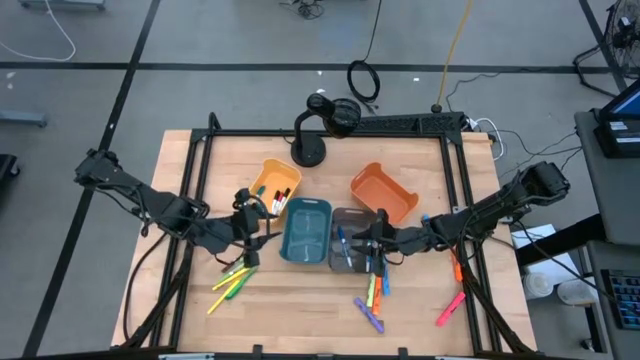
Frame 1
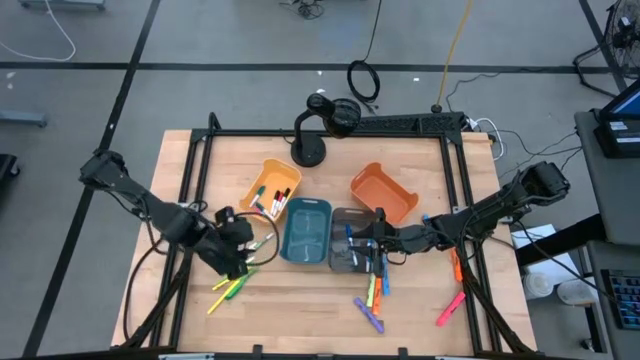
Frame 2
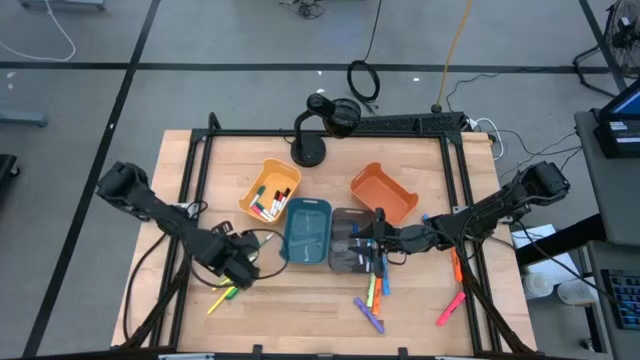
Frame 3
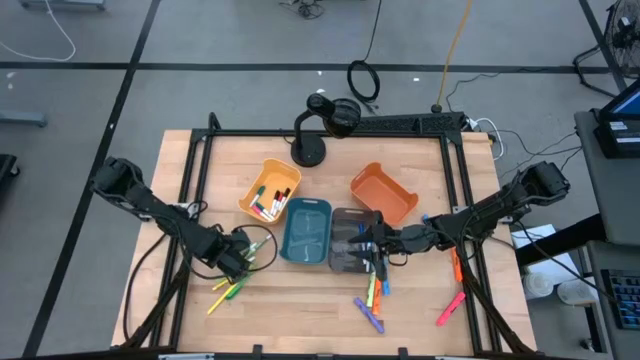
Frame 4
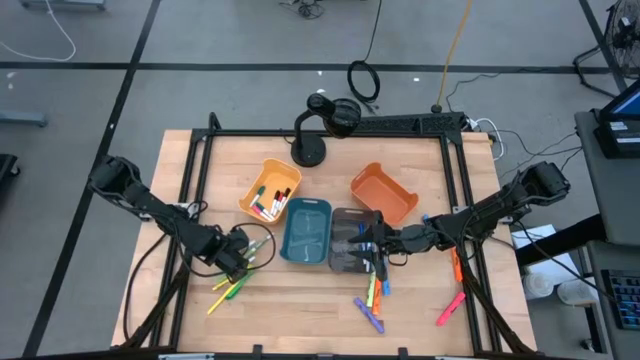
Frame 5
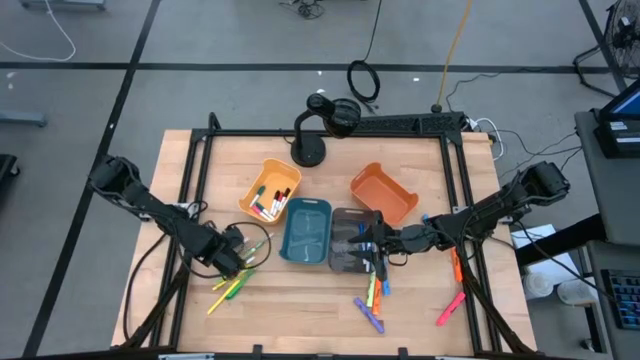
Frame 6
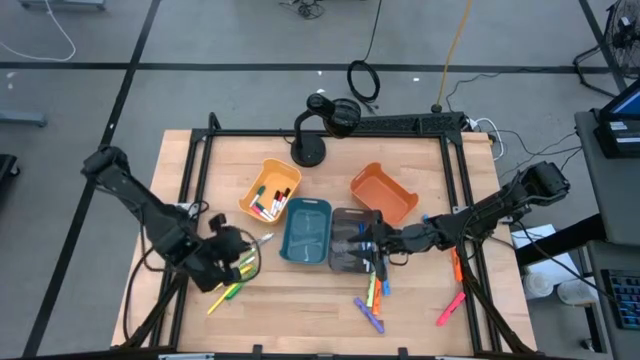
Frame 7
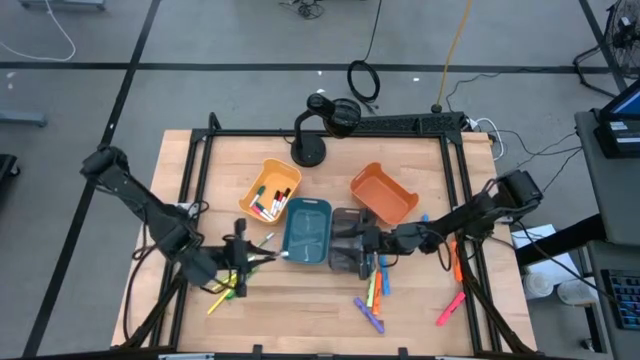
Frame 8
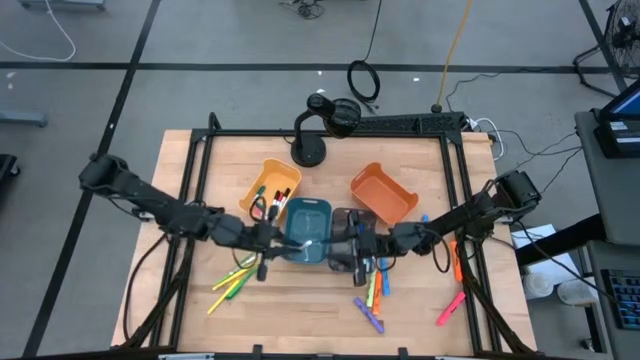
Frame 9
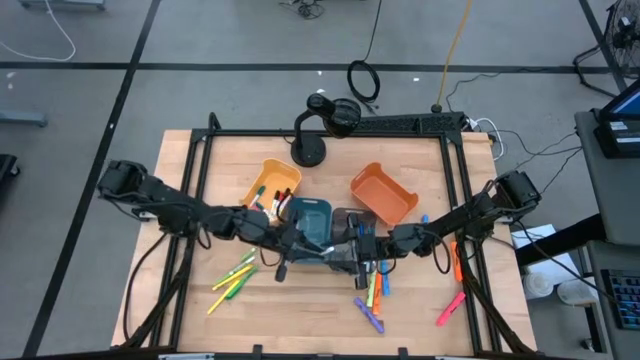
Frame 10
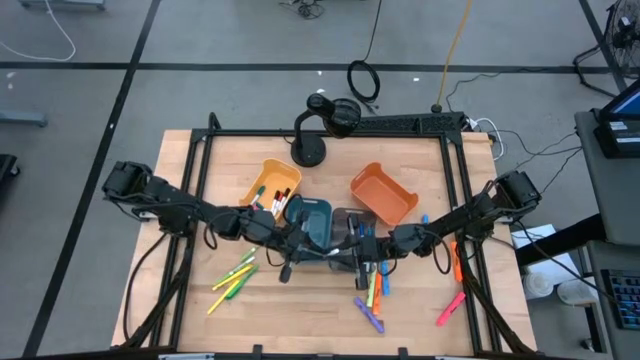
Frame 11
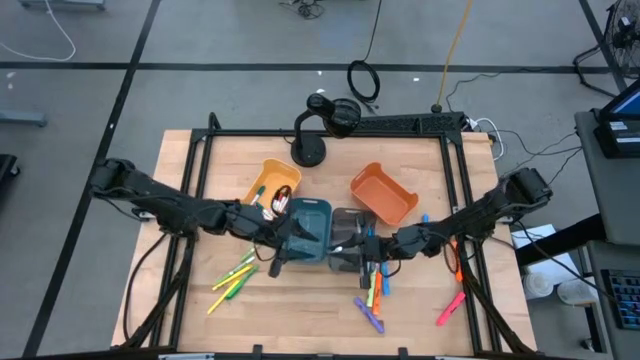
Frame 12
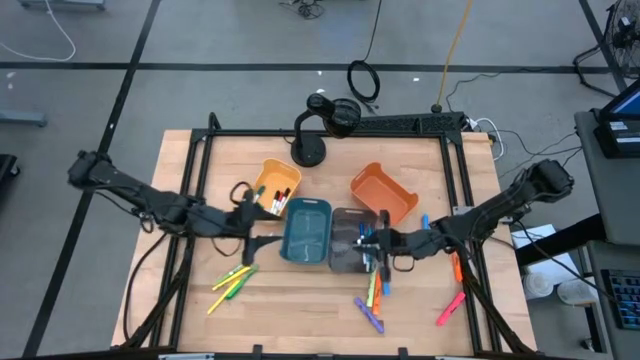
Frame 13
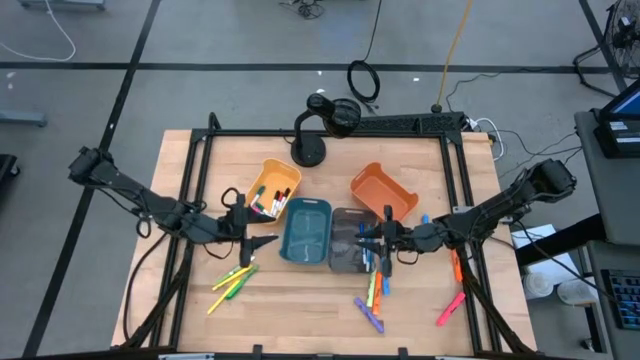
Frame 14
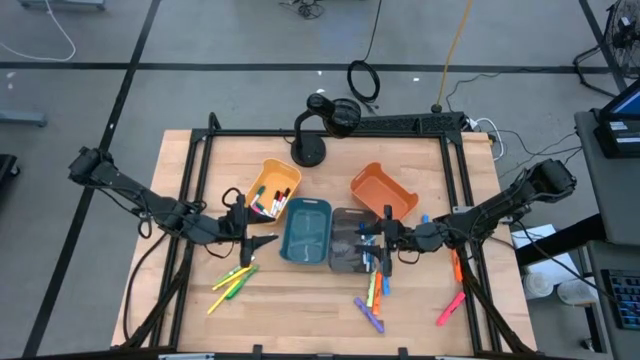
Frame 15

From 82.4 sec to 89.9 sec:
Task: Pick & Place Markers
Put the brown marker into the black bin

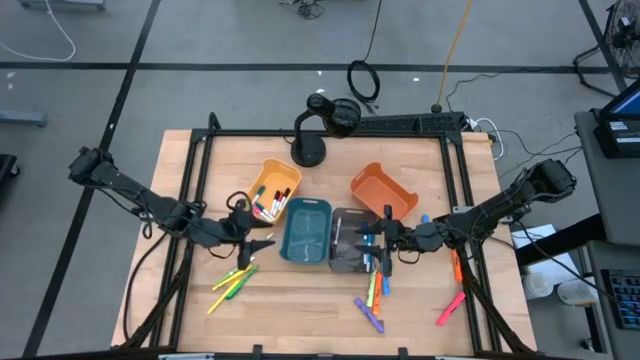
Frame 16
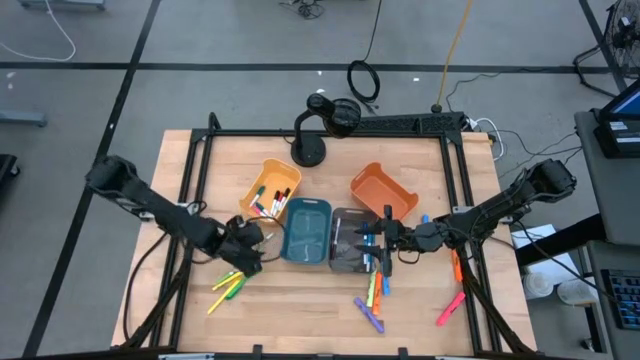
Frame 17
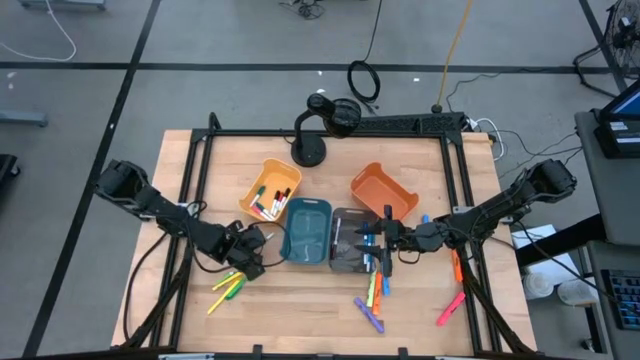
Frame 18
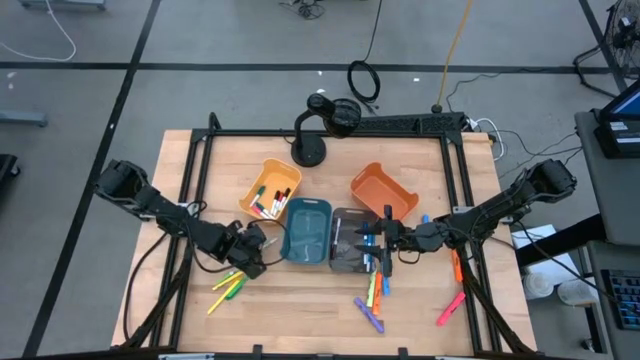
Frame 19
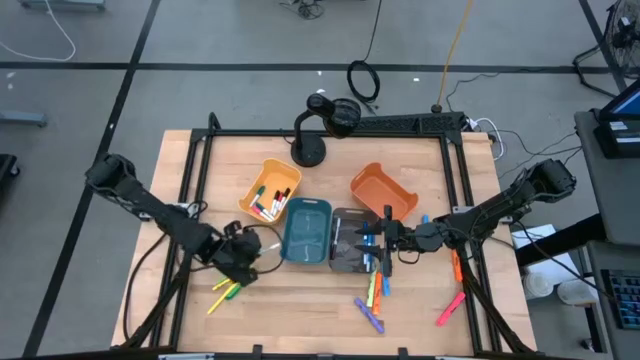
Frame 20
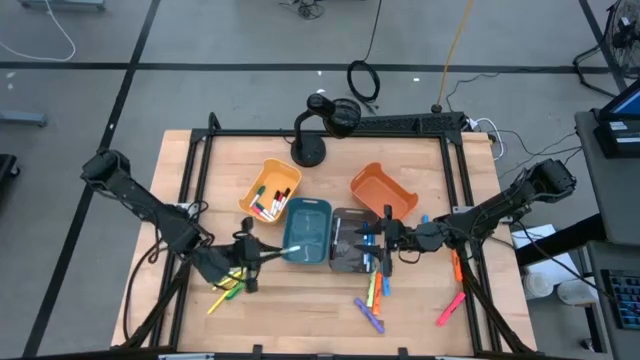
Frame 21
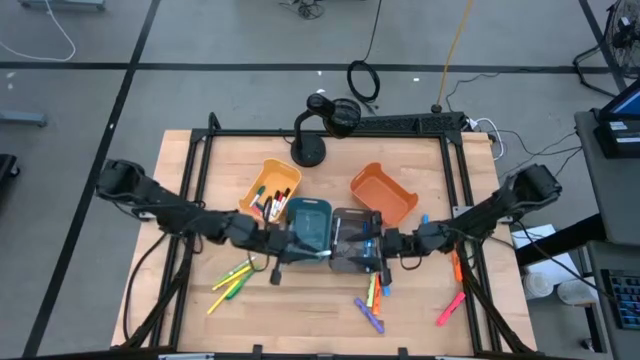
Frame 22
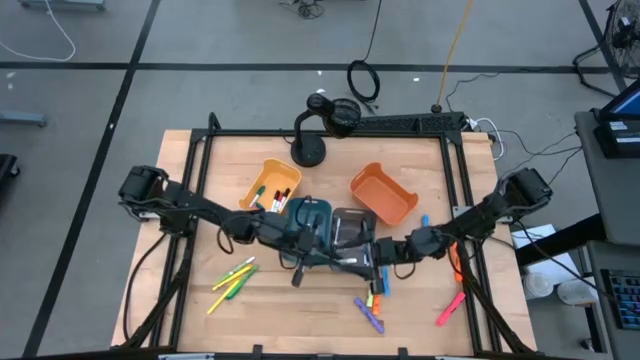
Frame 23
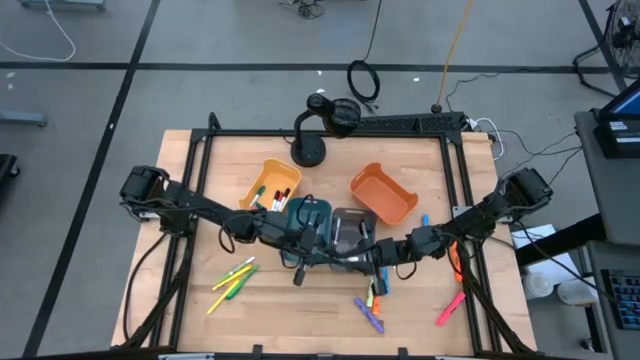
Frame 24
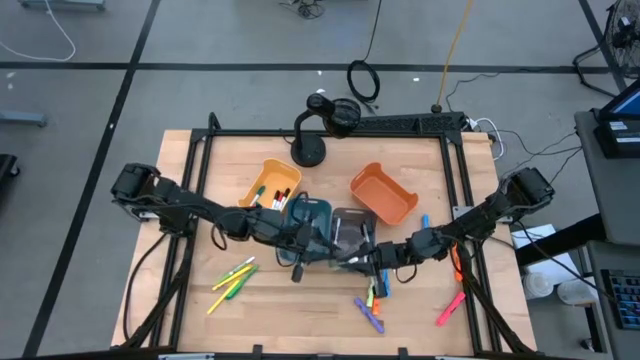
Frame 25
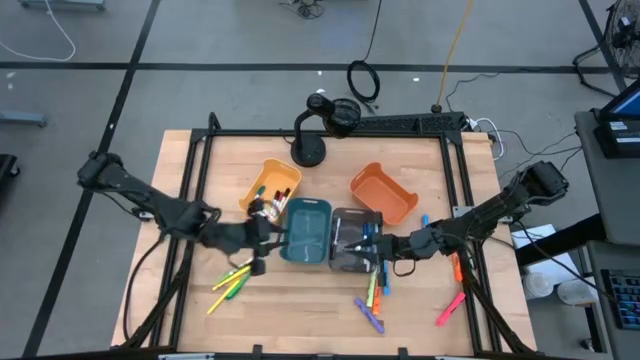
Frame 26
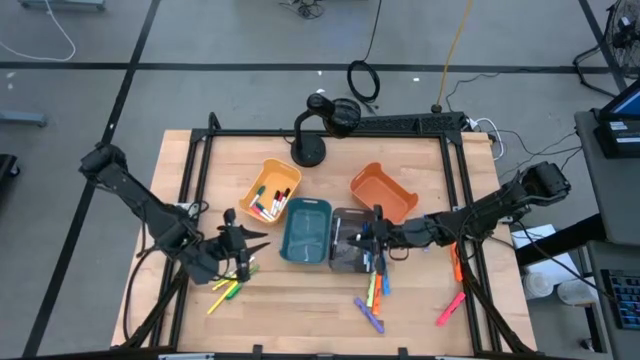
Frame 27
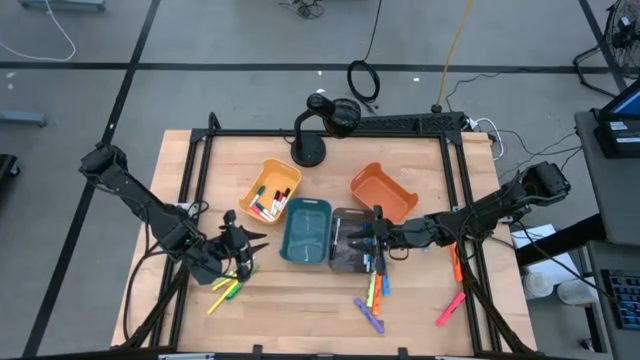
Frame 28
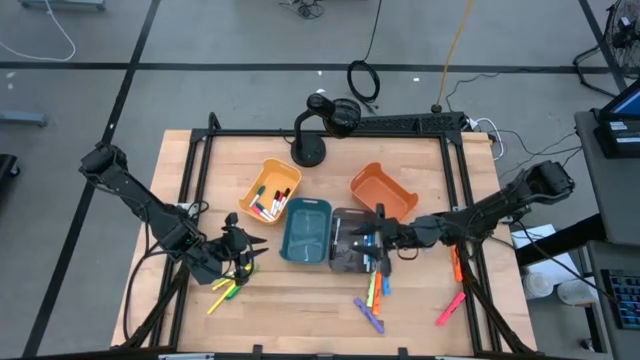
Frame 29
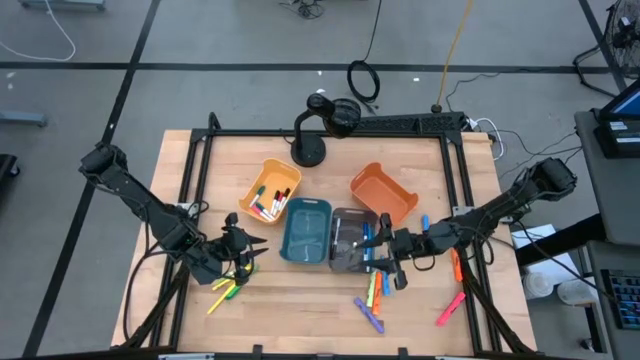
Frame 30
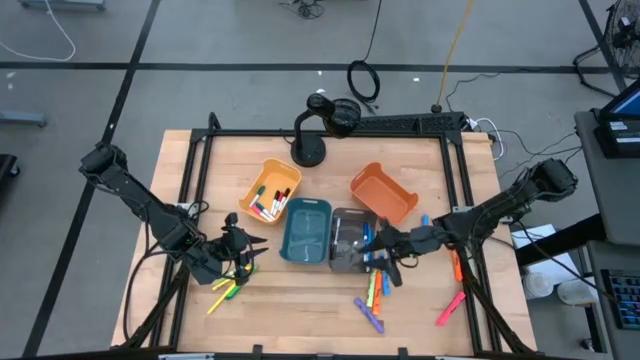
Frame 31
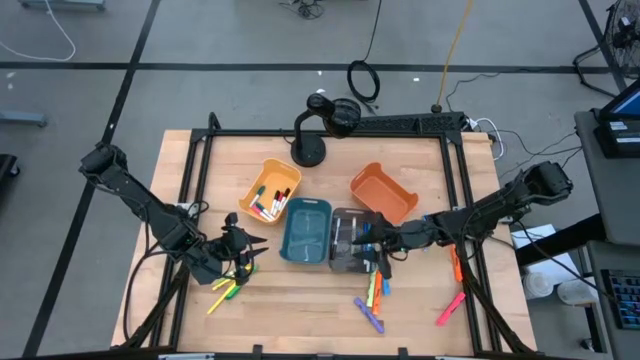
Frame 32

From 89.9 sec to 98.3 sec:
Put the top light green marker into the black bin

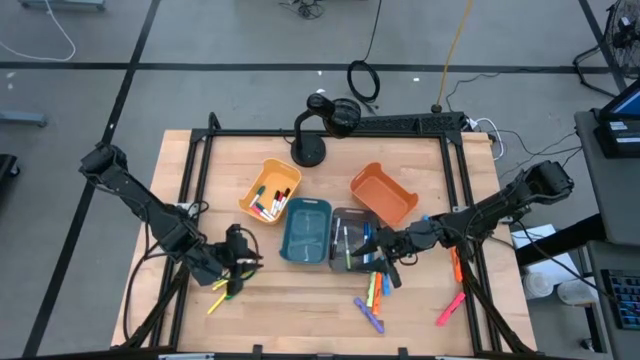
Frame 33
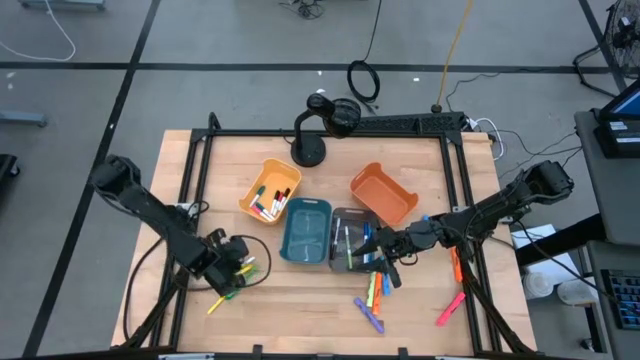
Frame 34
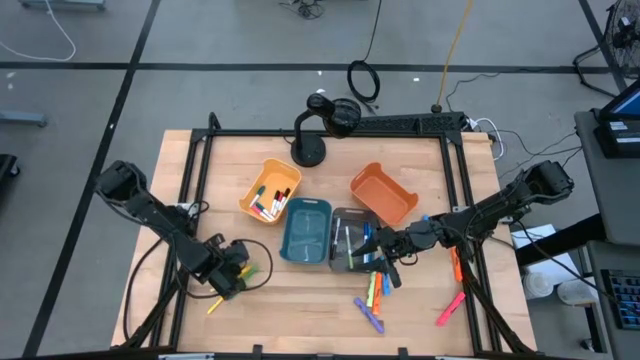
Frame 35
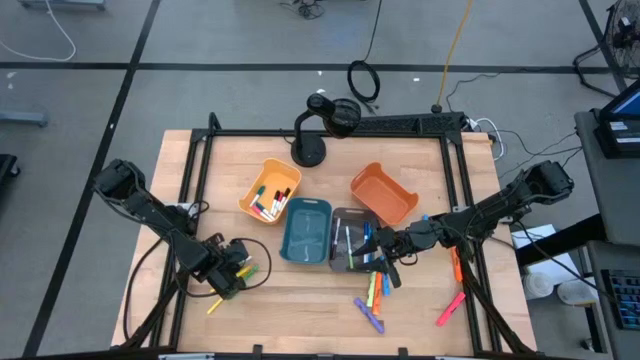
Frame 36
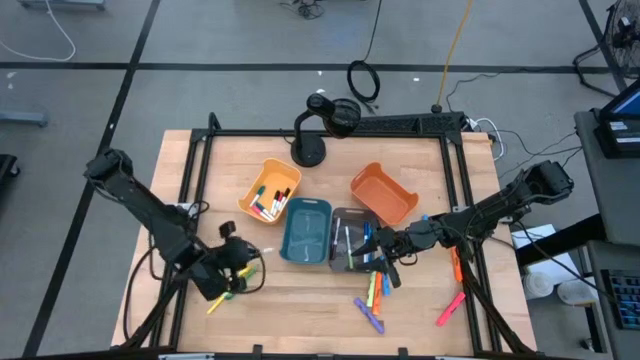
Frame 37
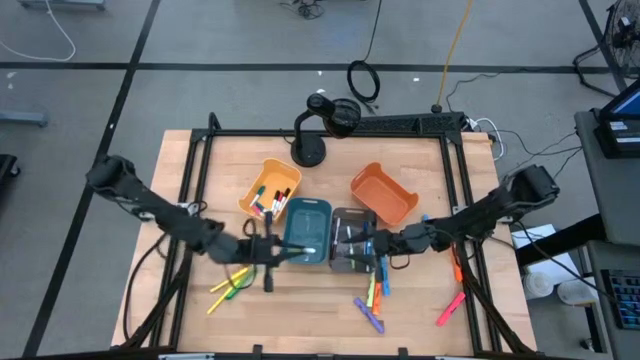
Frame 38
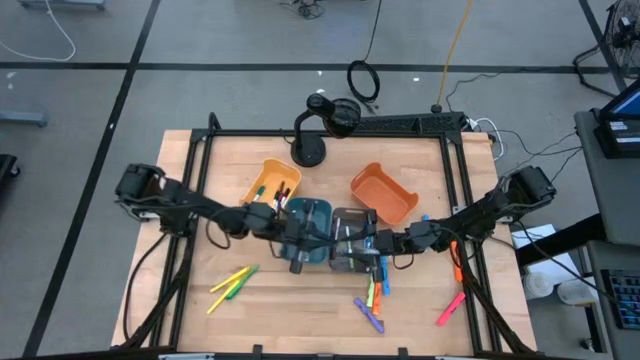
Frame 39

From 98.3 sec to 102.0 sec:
Put the light green marker into the black bin

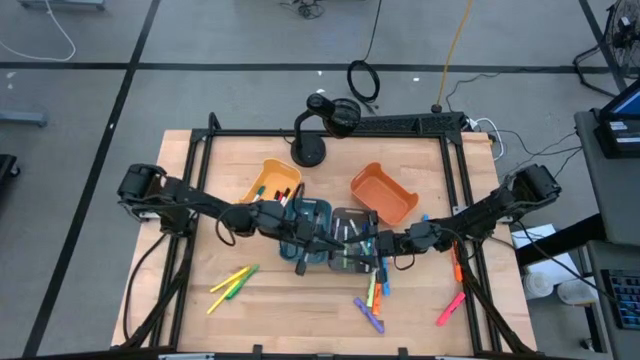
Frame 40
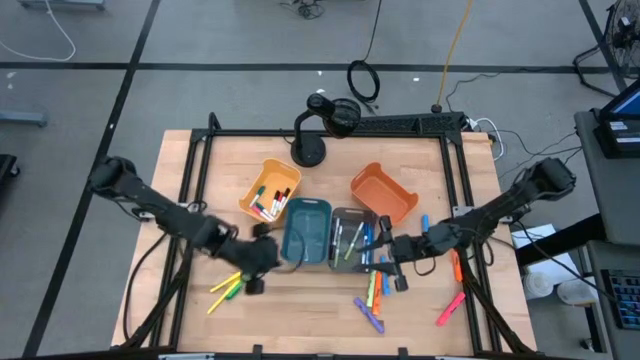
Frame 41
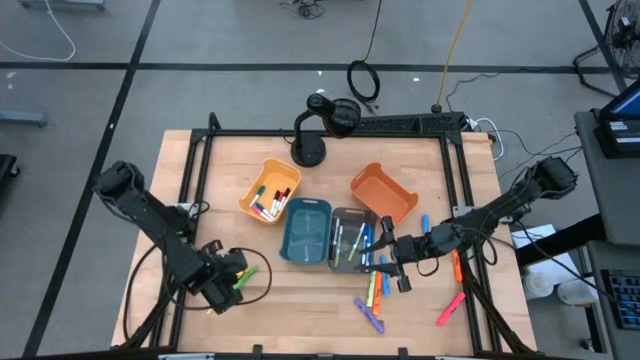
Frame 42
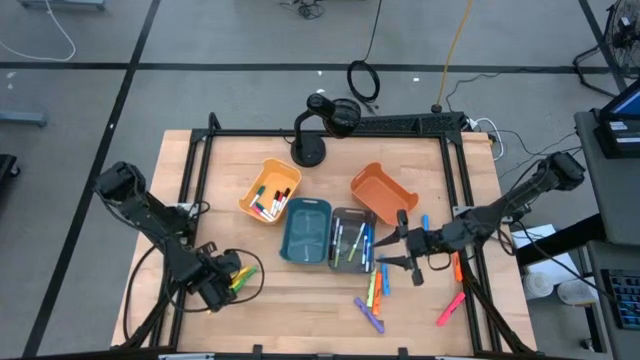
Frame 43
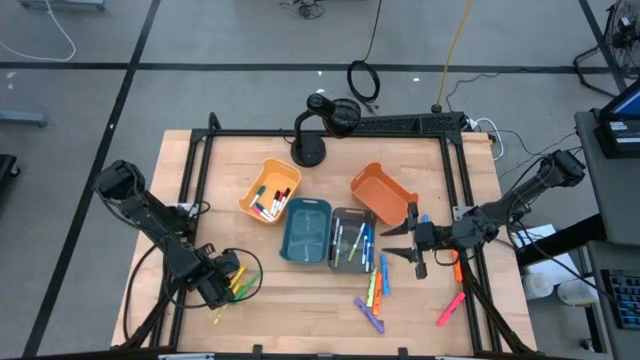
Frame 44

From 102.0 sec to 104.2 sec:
Put the yellow highlighter into the green bin
